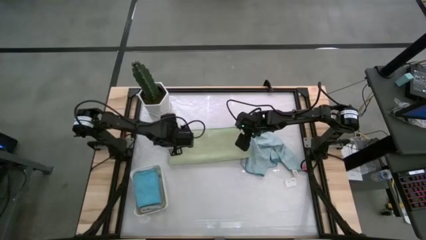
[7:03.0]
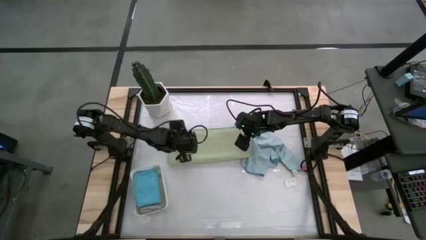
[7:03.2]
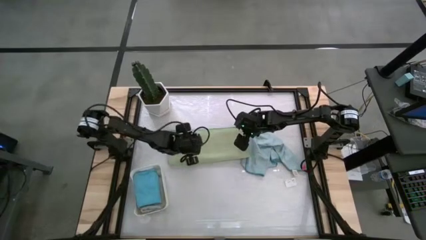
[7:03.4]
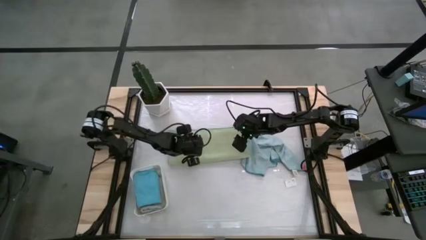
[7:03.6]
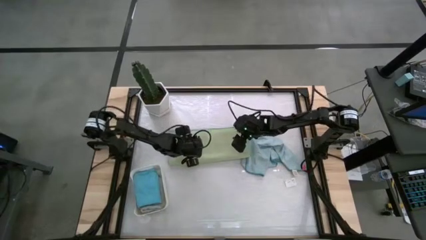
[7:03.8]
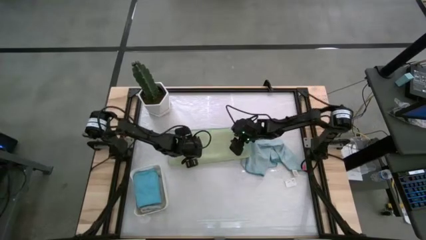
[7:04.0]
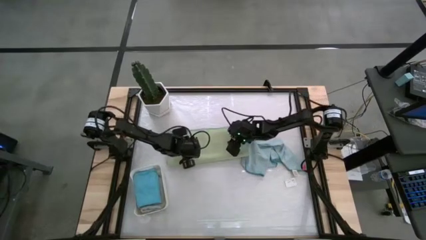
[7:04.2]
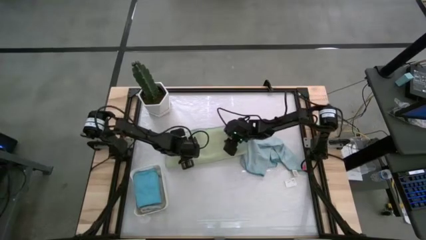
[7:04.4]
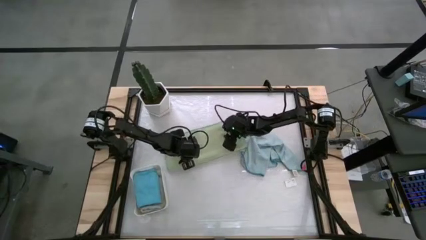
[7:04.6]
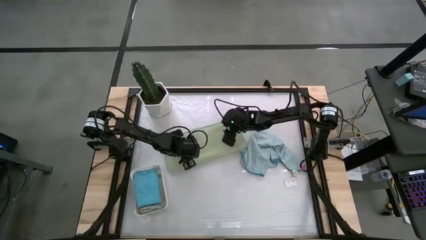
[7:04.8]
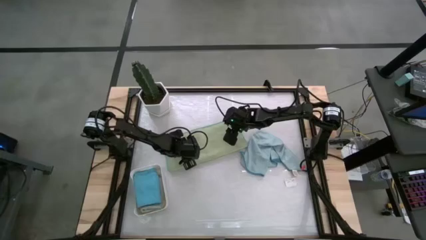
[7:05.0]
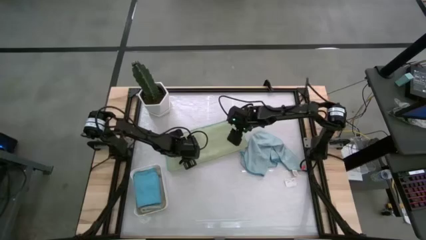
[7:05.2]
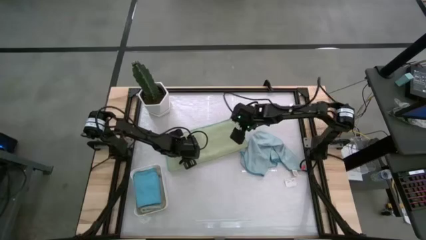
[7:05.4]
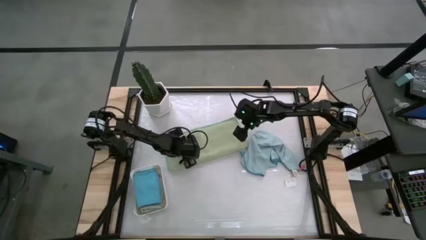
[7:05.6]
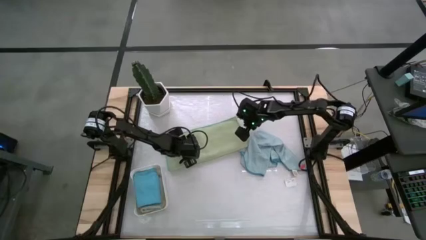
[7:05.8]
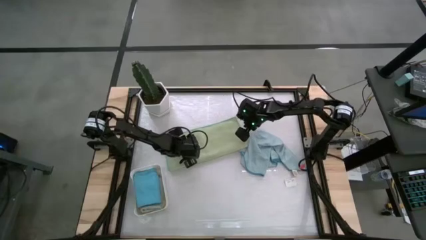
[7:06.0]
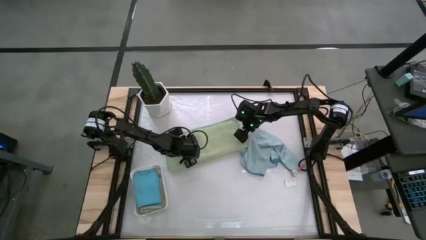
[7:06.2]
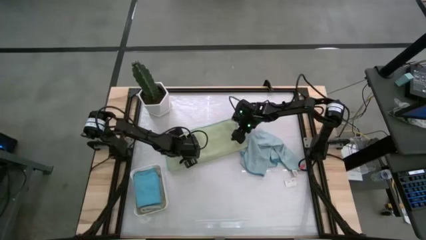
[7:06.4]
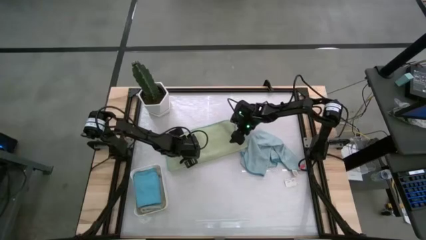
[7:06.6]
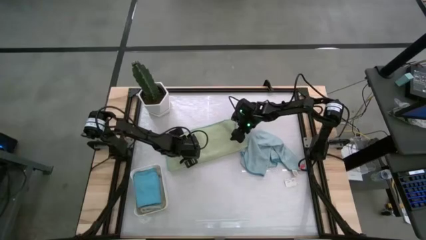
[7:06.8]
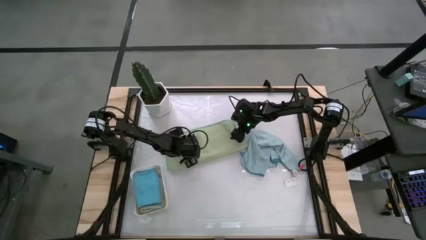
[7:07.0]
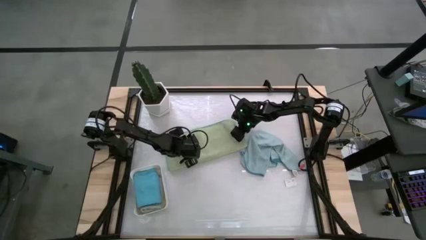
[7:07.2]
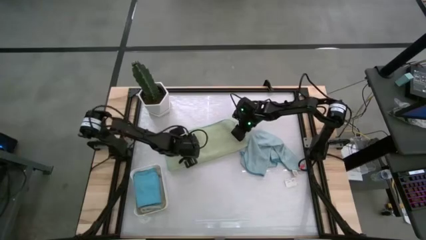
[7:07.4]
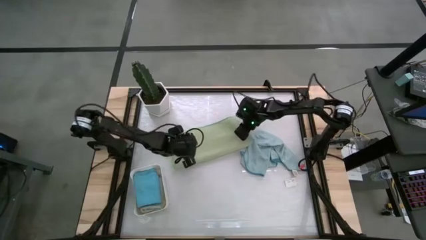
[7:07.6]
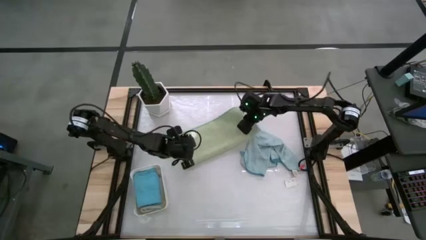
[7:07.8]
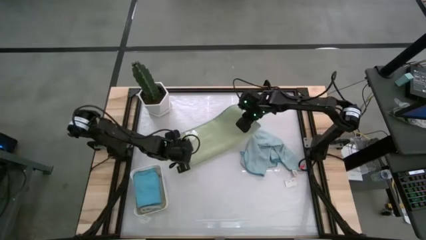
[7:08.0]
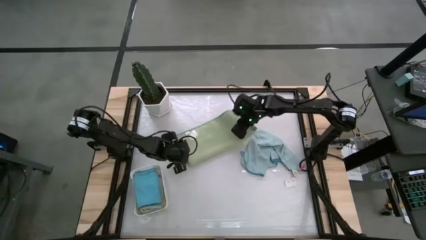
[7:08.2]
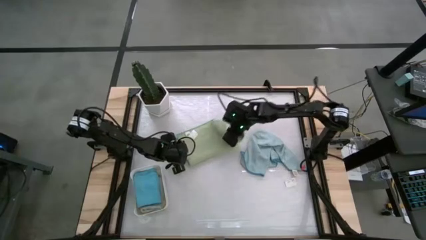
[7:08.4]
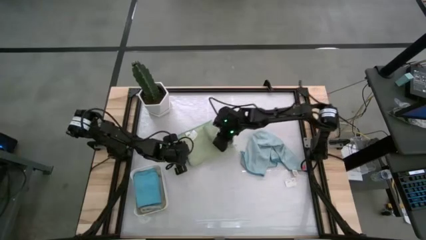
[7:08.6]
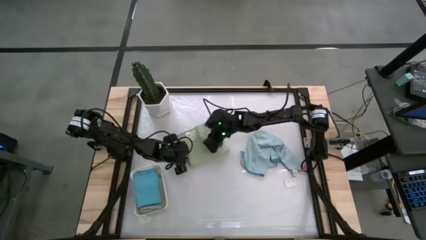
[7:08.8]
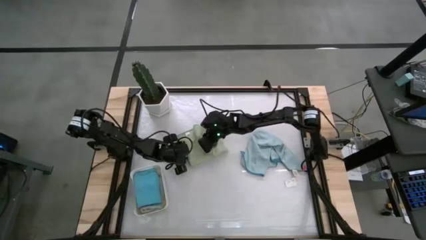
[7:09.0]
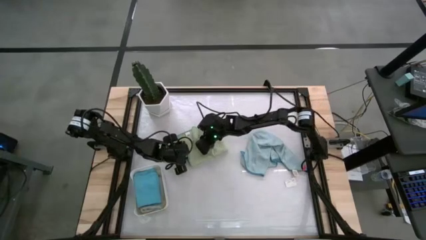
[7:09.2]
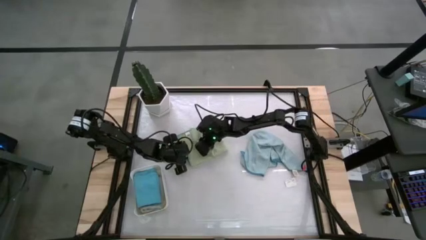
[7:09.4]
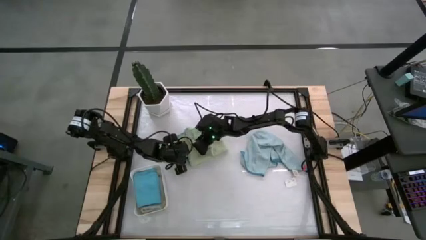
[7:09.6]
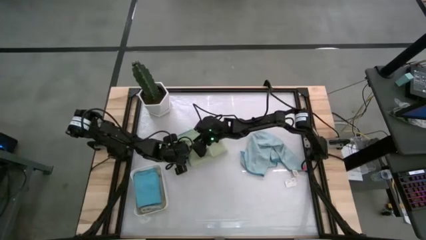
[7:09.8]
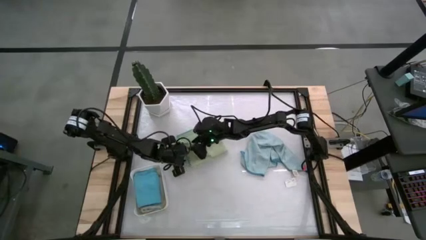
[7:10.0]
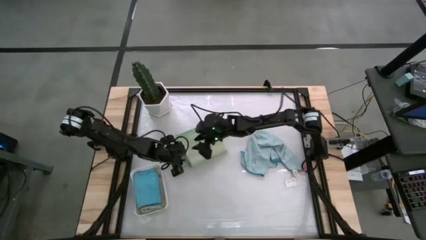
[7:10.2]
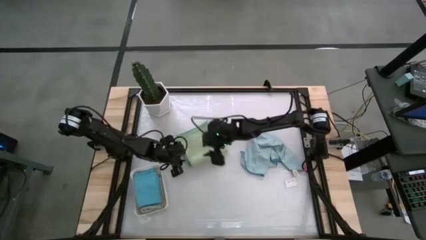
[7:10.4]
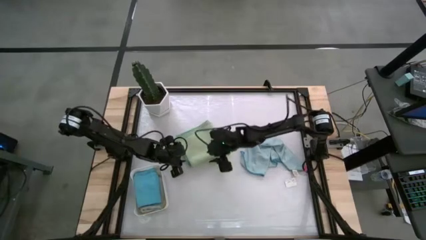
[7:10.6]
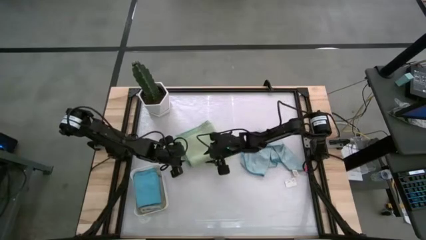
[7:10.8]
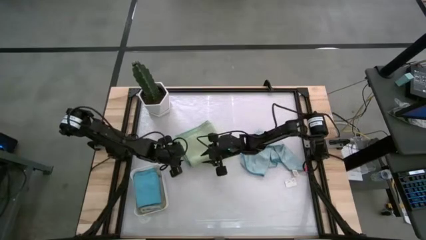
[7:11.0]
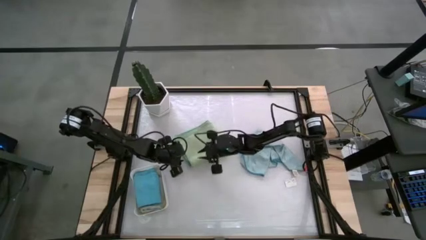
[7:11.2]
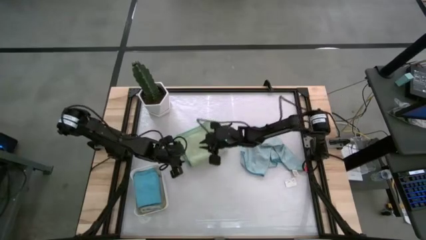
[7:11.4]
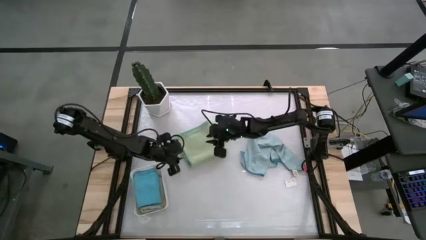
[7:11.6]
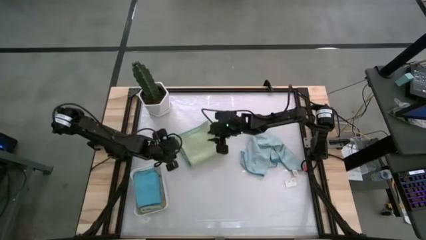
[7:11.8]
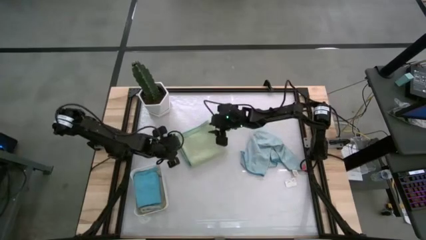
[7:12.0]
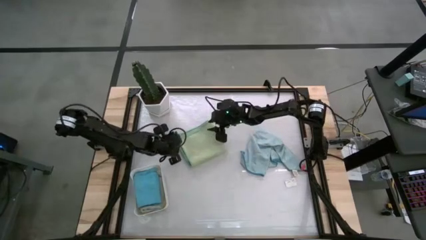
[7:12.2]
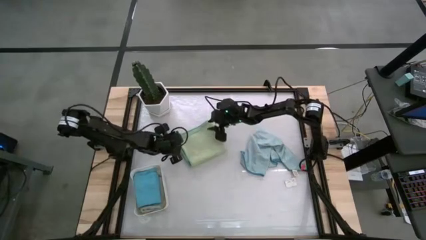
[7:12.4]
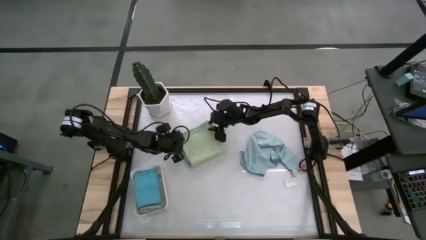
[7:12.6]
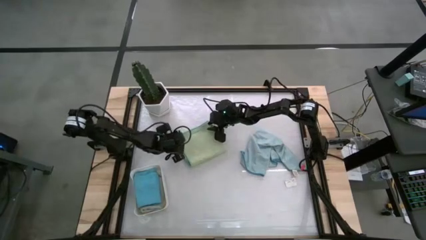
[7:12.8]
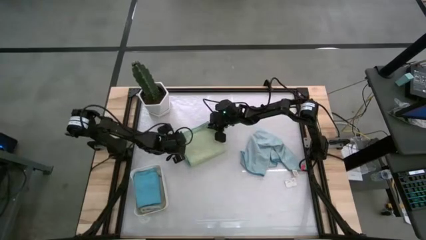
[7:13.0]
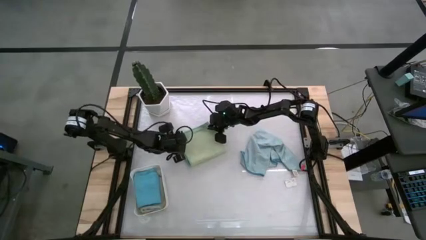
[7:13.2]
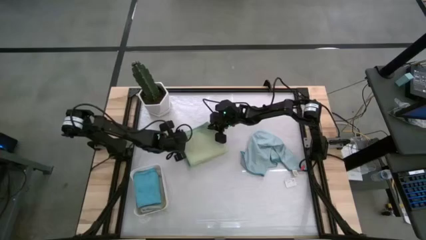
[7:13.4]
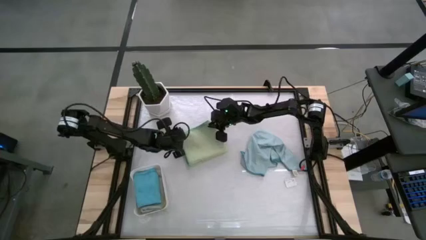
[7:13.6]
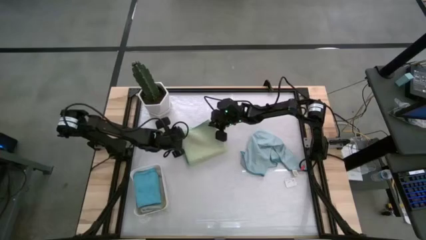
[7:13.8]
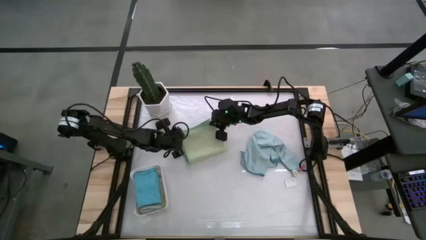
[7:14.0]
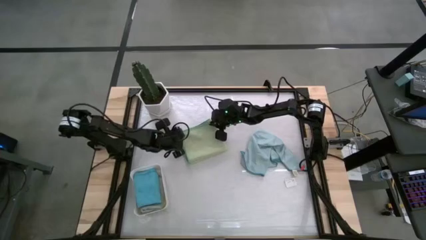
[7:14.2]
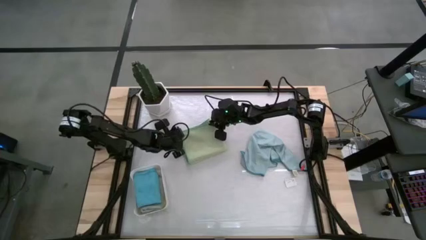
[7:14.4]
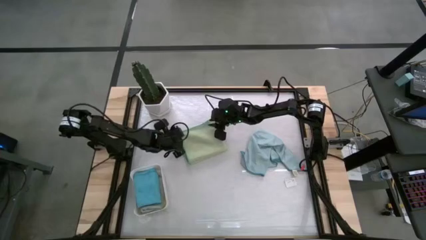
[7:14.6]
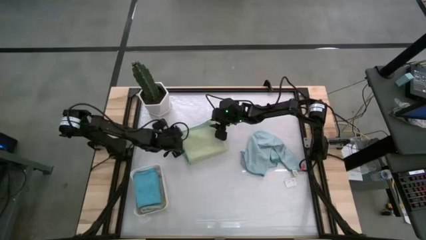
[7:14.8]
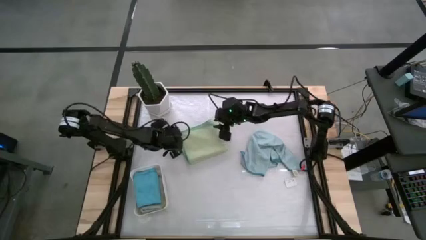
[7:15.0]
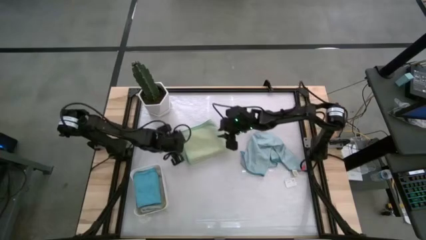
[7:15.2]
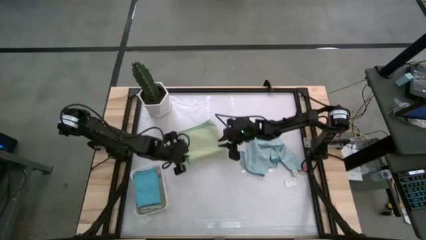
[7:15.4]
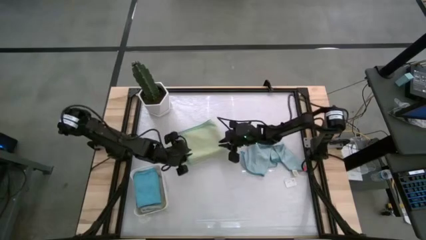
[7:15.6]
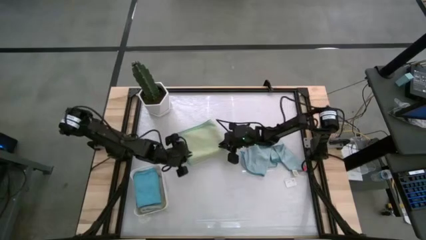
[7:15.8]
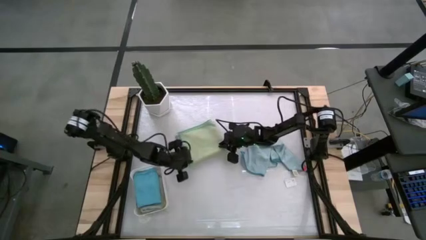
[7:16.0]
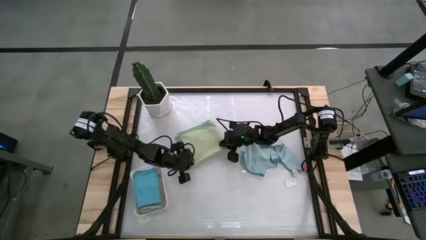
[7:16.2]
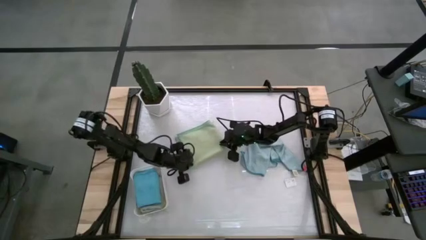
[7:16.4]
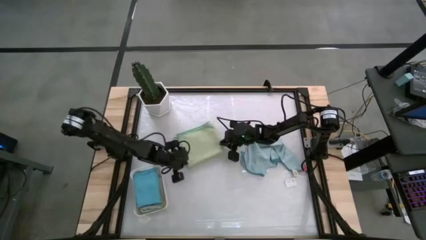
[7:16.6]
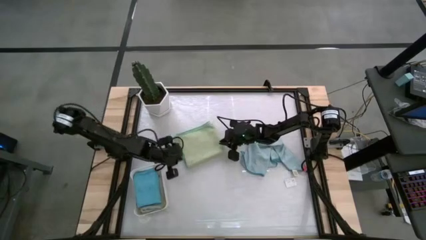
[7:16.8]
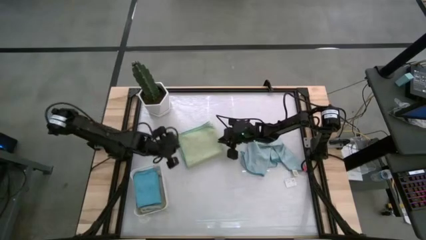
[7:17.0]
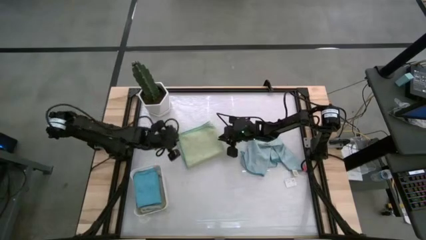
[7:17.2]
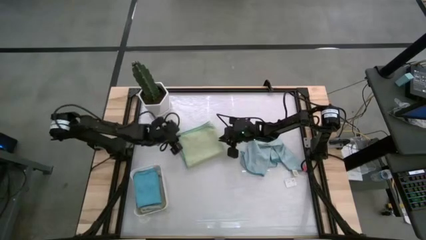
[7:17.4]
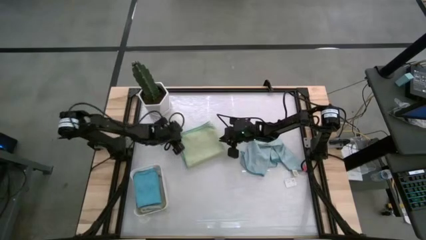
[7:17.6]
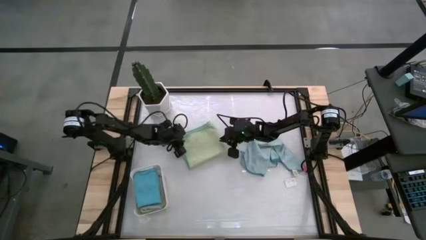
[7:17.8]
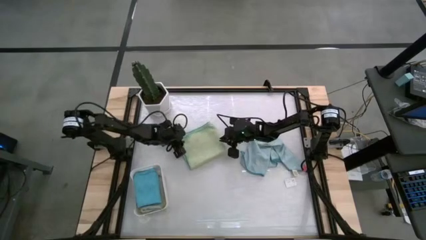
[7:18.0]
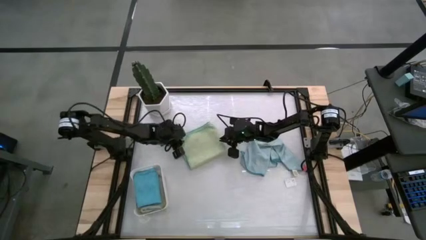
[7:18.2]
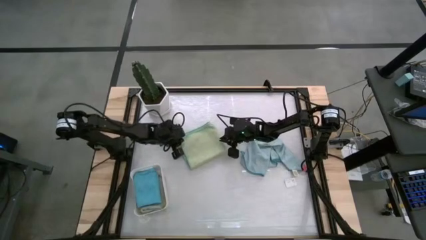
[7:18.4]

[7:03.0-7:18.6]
Task: Fold microfiber towels
Fold the green microfiber towel
